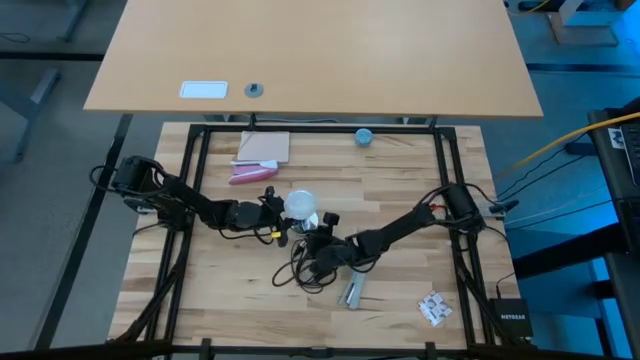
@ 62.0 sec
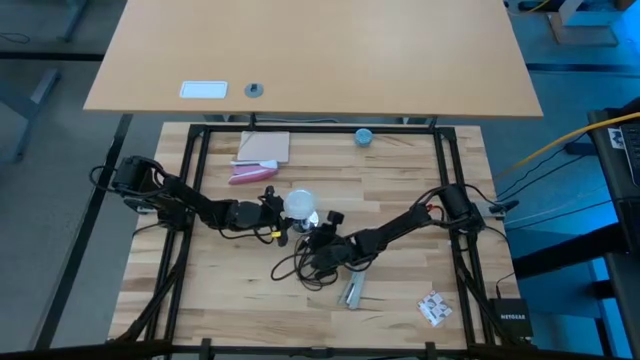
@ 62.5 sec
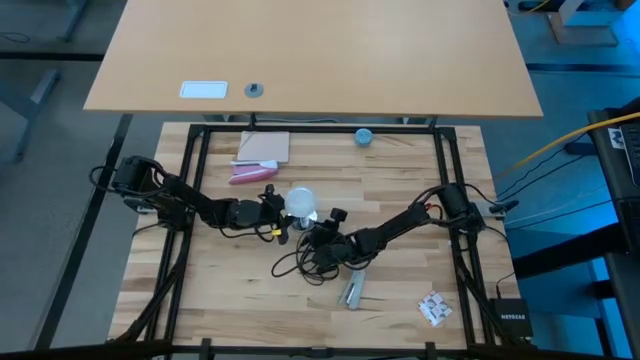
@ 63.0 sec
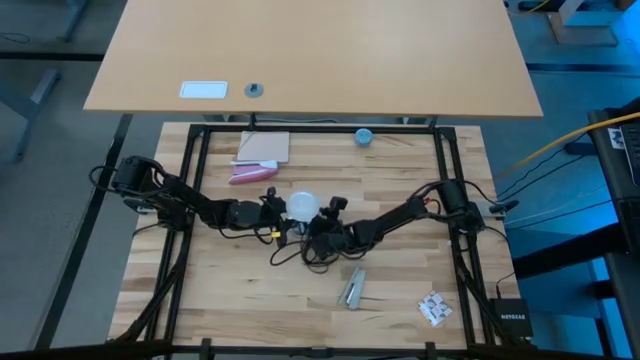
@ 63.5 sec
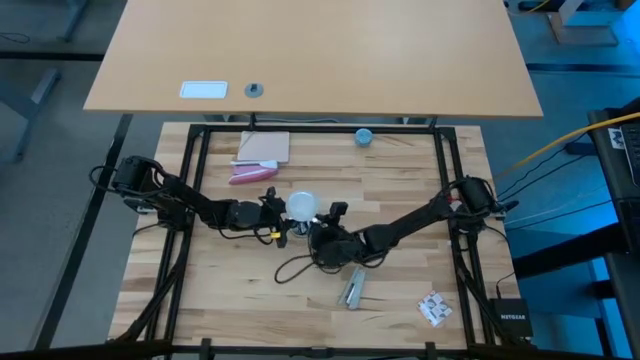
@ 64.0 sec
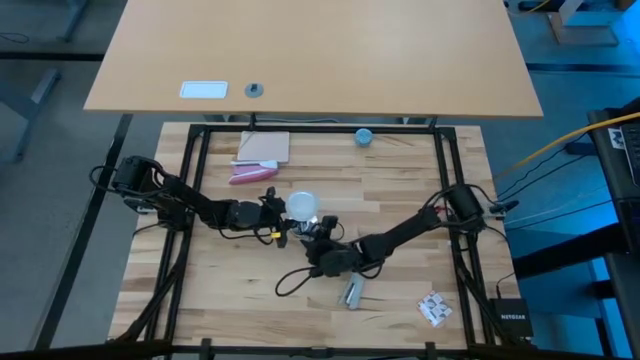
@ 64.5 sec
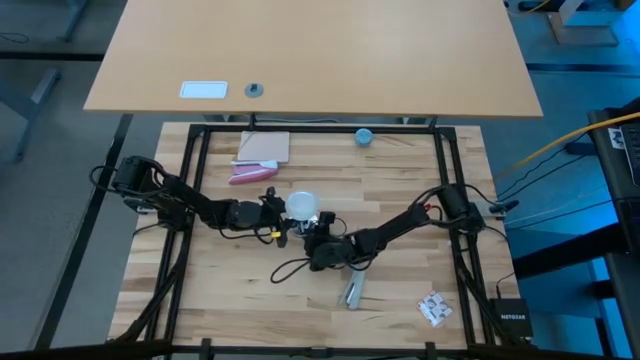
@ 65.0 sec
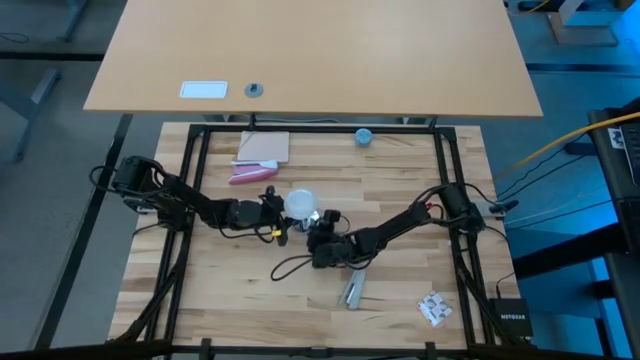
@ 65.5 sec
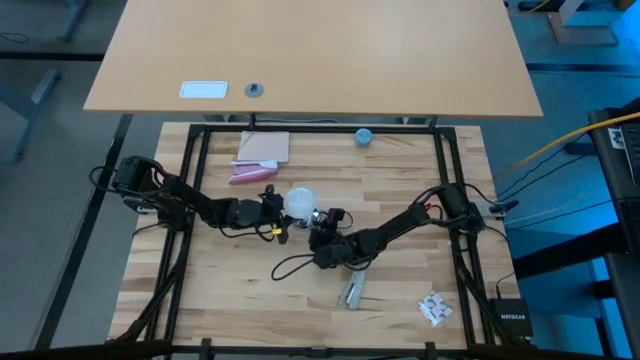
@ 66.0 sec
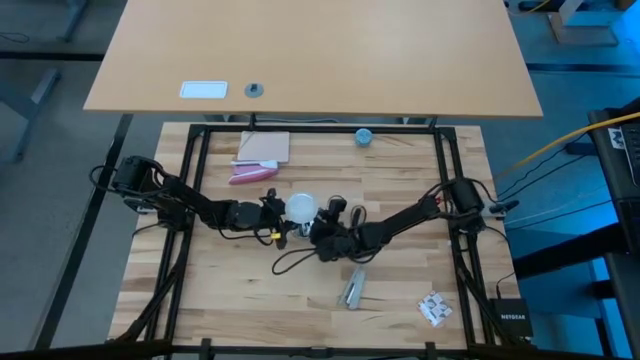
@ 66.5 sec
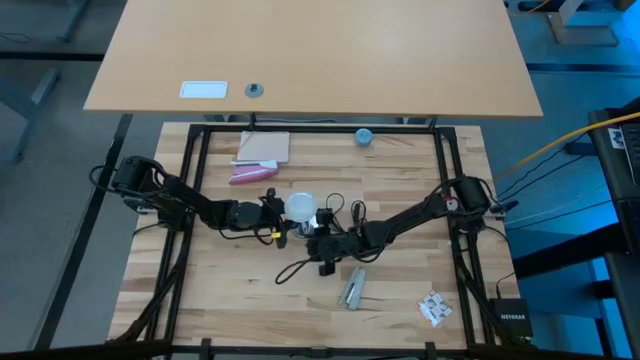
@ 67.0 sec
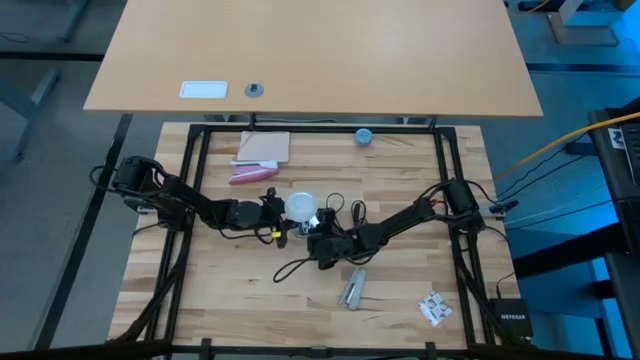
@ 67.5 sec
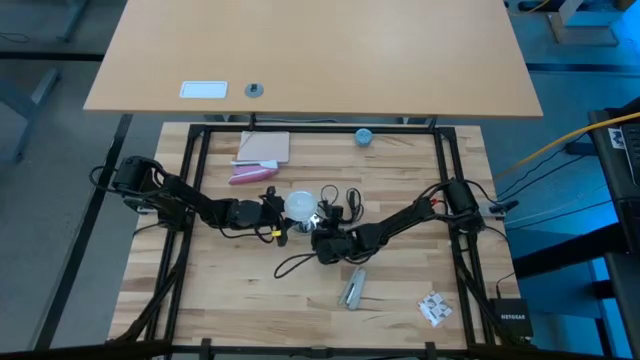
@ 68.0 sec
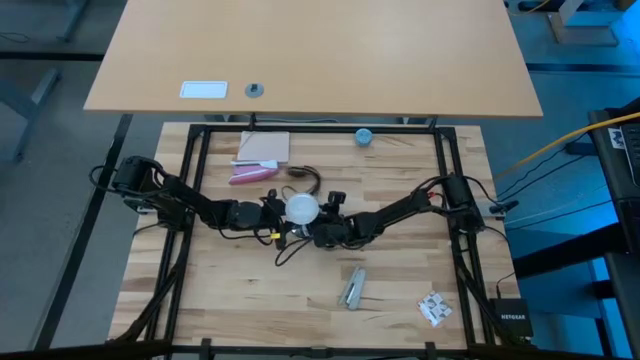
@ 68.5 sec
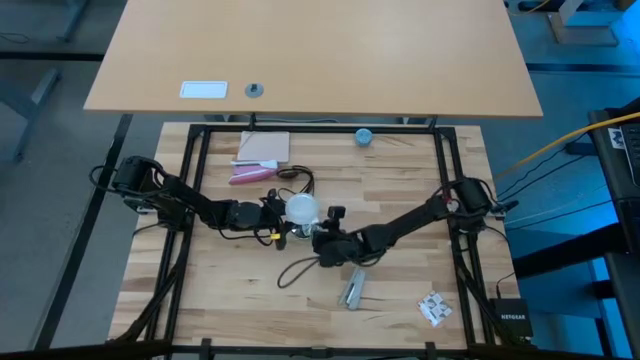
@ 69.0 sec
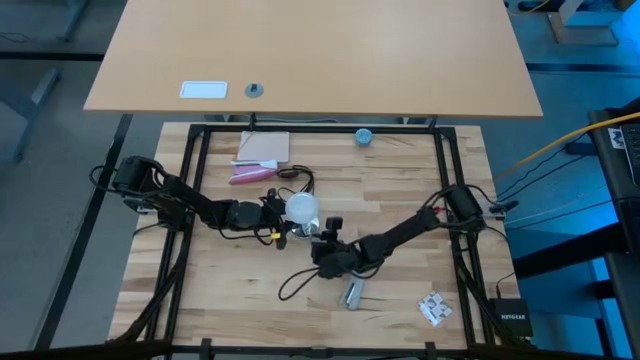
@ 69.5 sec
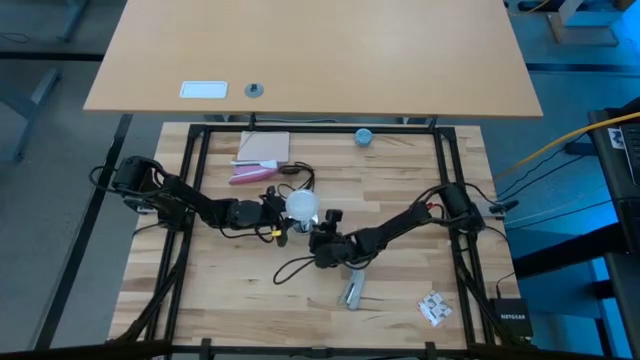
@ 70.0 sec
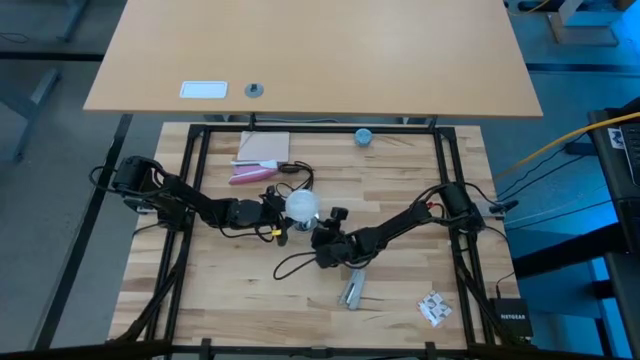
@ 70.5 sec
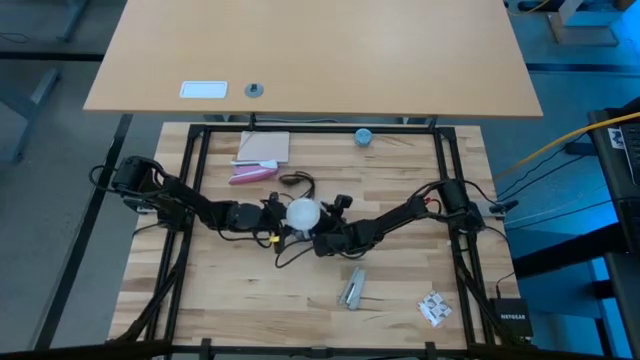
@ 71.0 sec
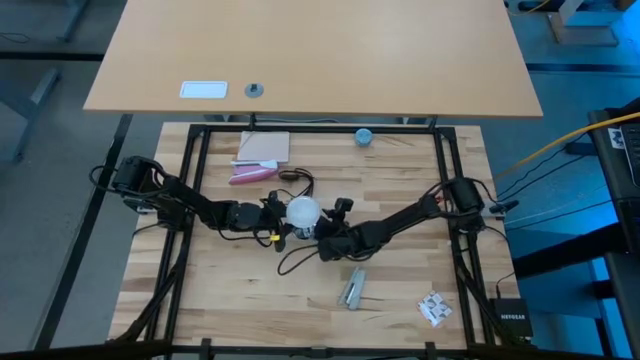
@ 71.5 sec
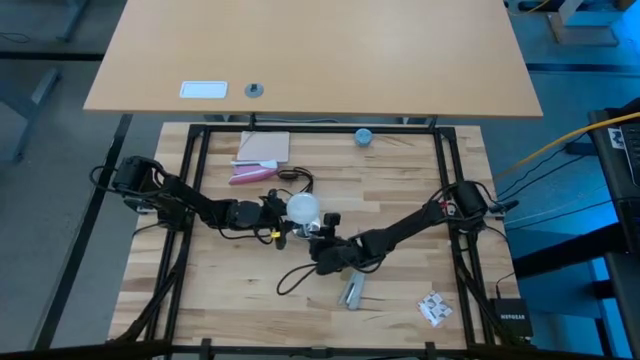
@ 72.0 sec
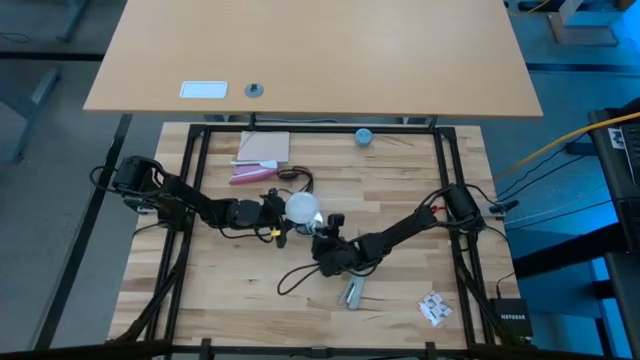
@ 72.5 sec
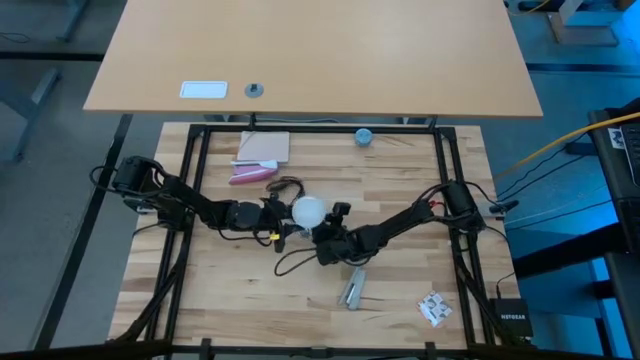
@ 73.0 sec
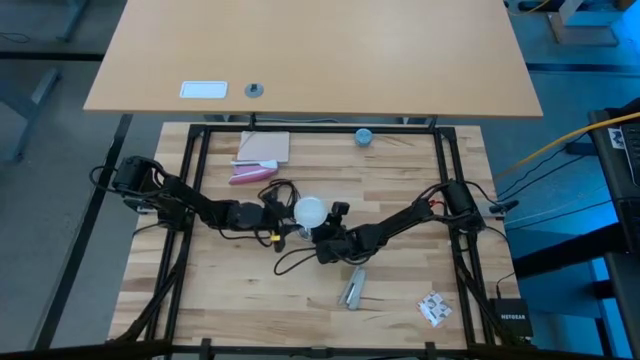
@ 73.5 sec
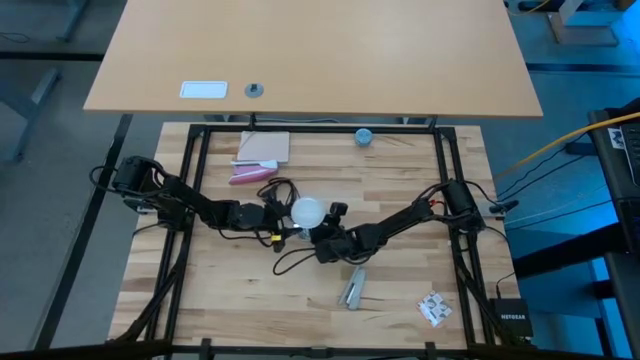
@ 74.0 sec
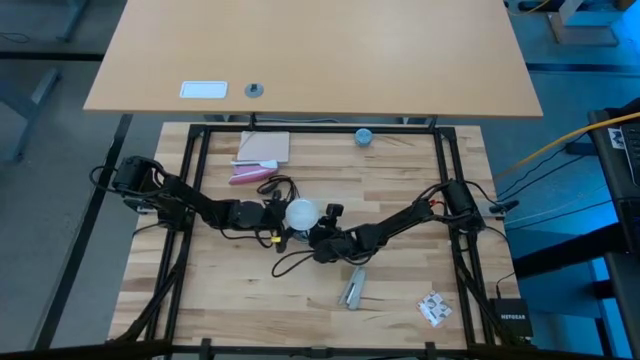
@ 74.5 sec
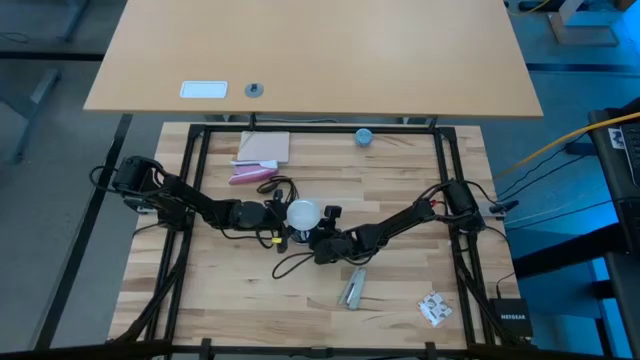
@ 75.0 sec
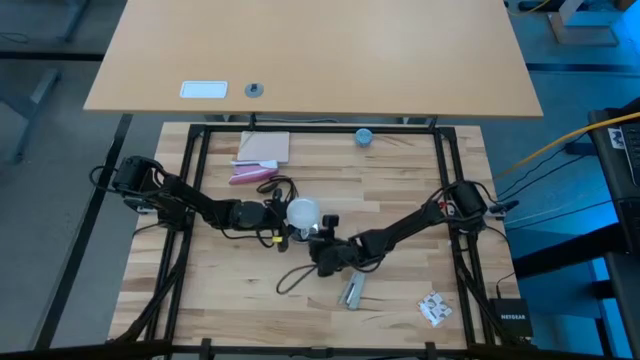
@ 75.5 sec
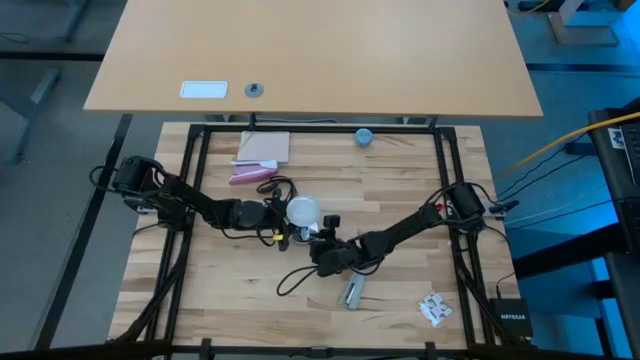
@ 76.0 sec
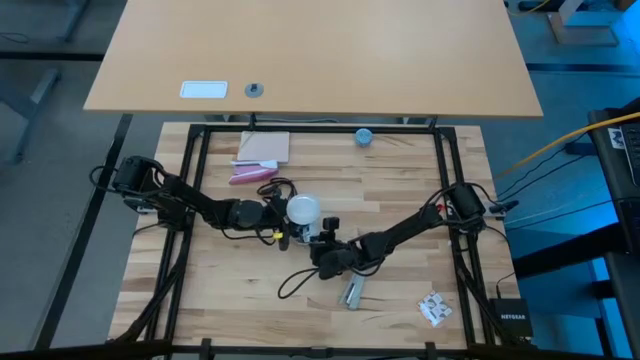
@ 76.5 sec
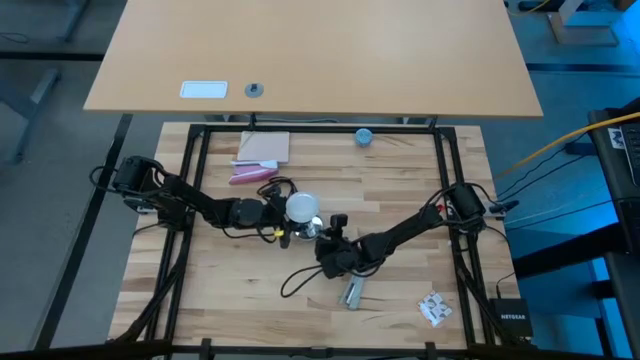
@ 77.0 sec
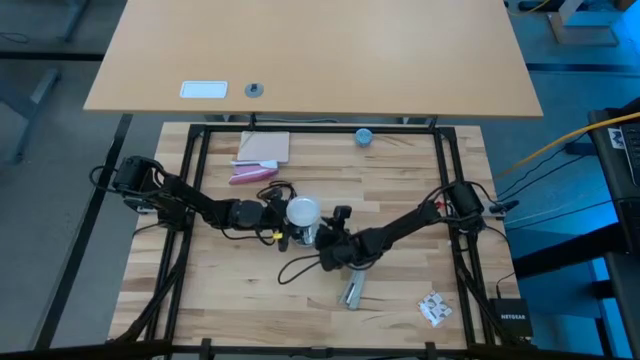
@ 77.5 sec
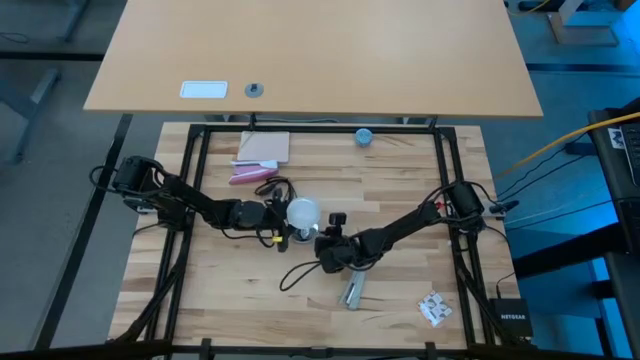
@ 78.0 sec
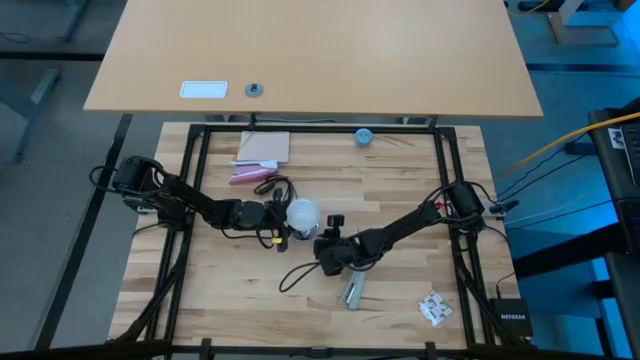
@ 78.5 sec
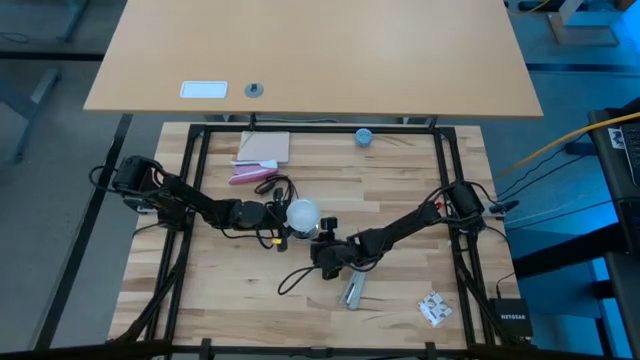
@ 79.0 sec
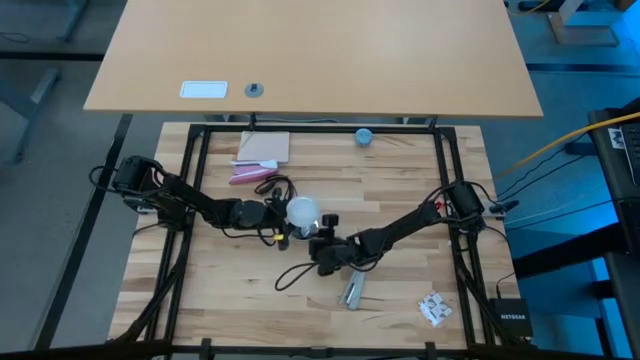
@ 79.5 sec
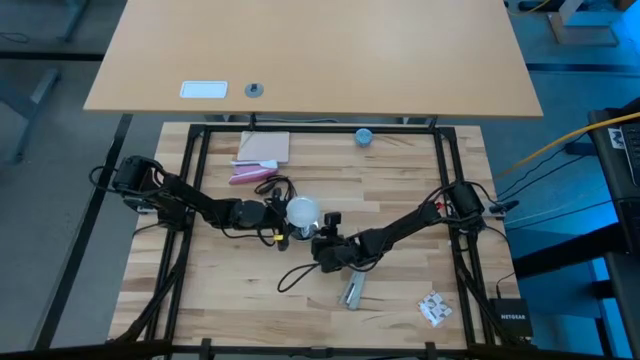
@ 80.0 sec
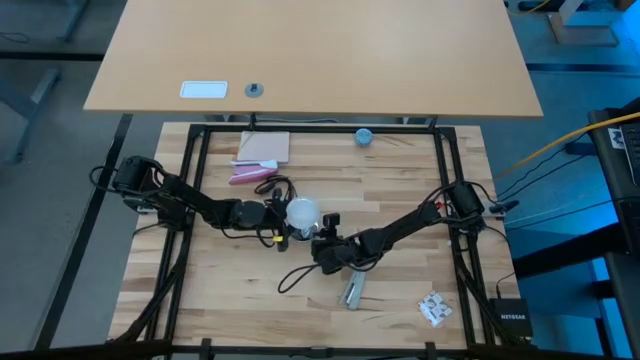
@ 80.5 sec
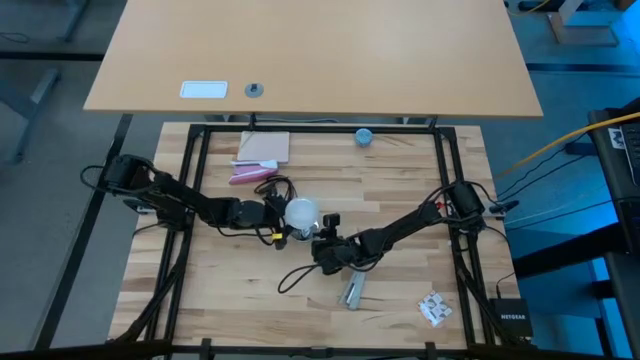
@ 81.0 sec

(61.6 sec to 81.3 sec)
Task: Screw lightbulb
Insert the lightbulb into the lamp

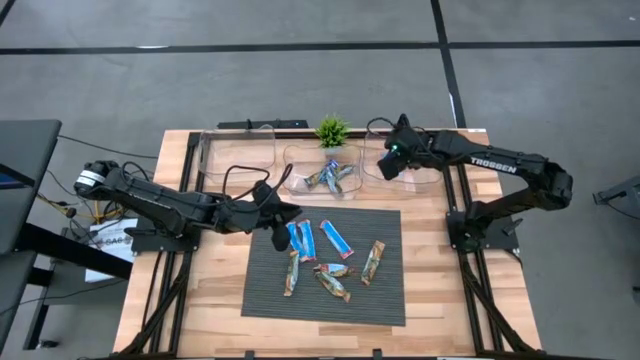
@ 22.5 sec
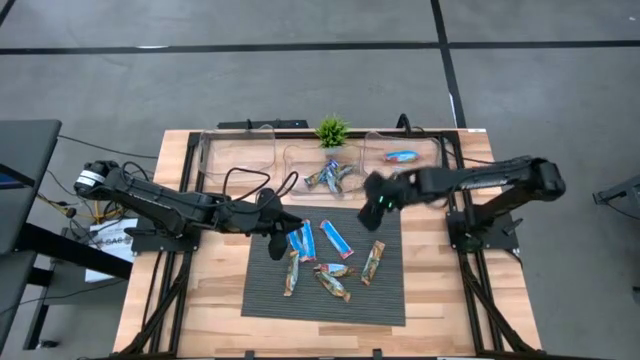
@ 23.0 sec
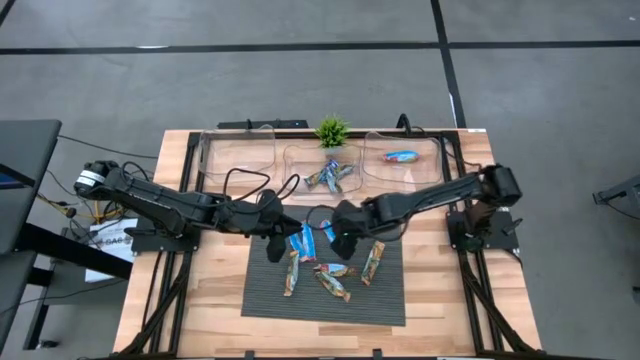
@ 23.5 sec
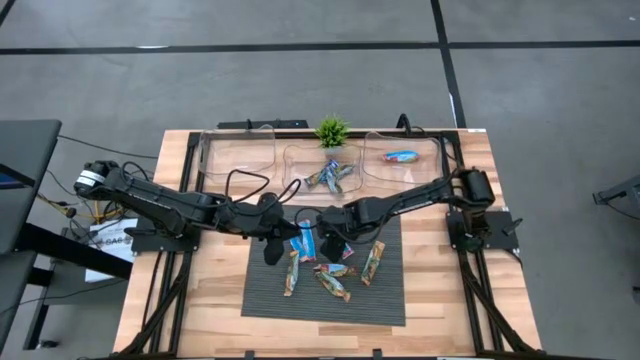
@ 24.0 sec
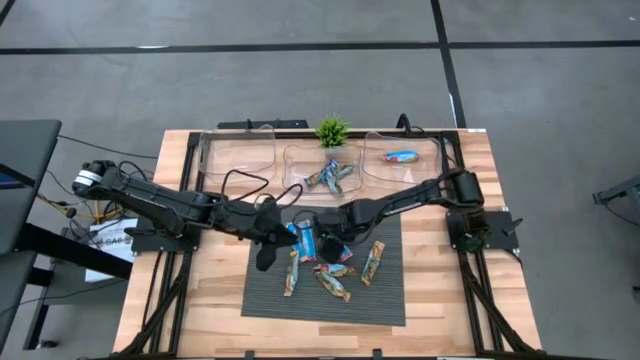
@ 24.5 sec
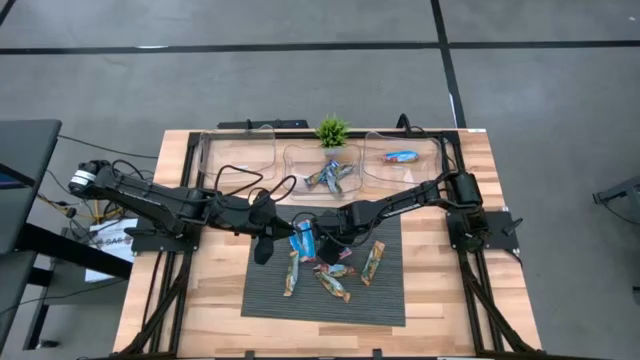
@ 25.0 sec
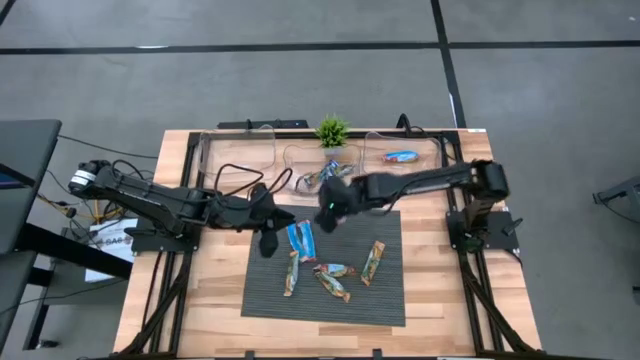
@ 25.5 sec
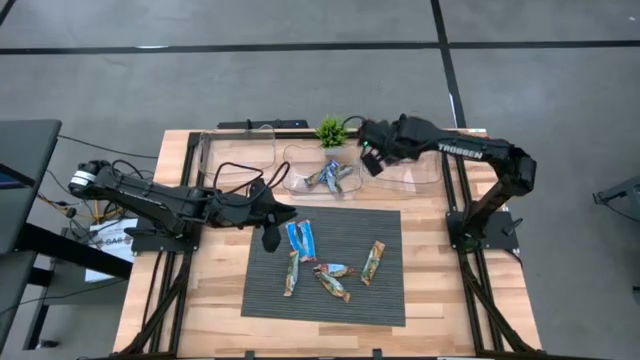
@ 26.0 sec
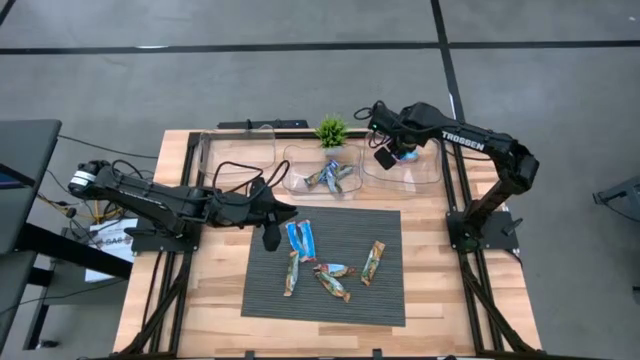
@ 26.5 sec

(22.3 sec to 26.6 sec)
Task: Pick and place Granola Bars by type
Put the red granola bar into the right transparent bin
